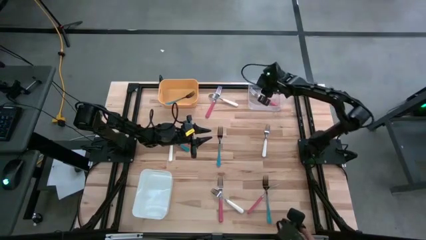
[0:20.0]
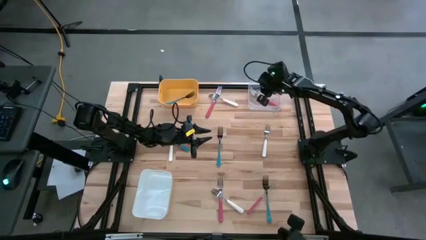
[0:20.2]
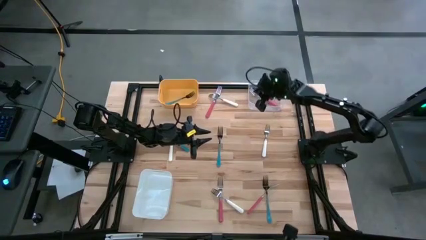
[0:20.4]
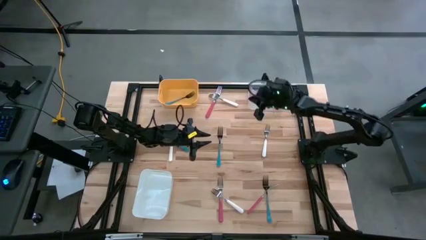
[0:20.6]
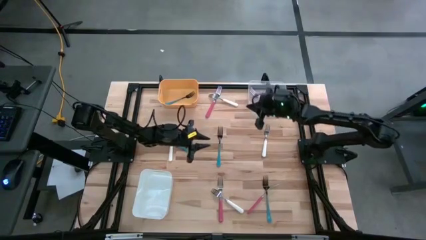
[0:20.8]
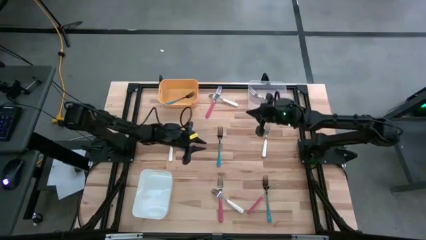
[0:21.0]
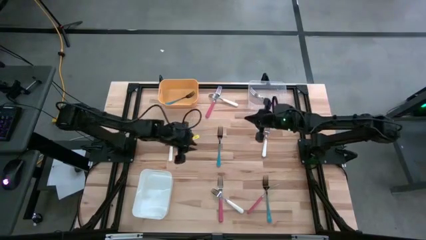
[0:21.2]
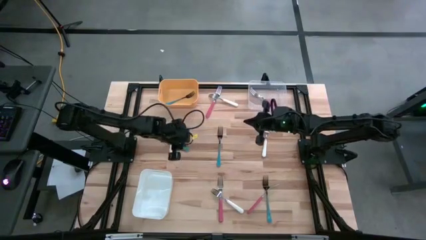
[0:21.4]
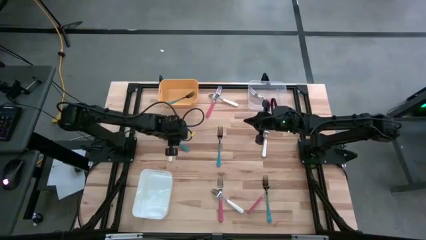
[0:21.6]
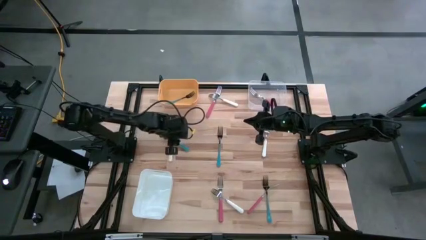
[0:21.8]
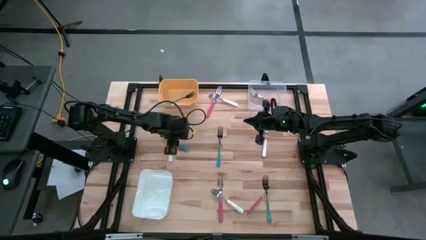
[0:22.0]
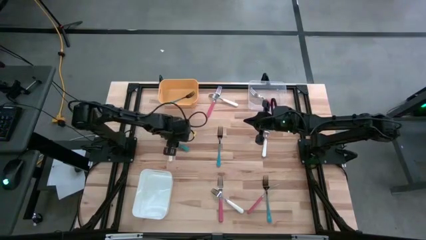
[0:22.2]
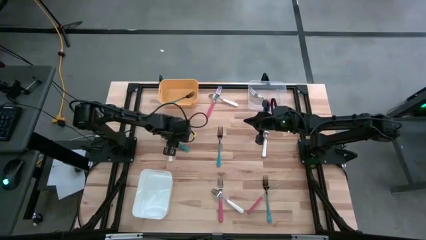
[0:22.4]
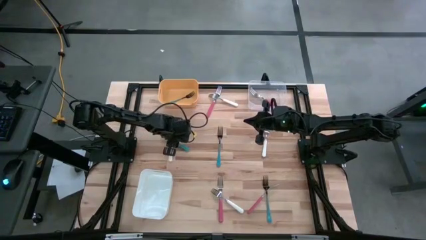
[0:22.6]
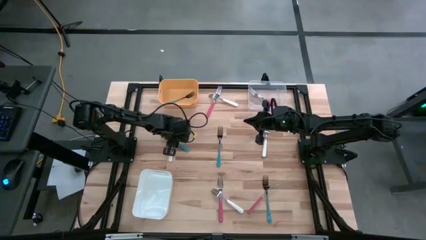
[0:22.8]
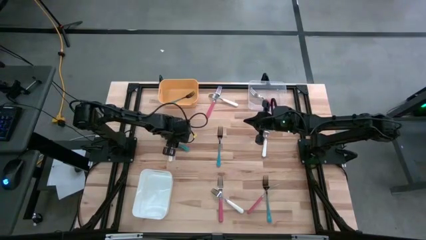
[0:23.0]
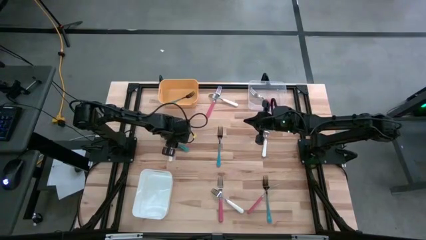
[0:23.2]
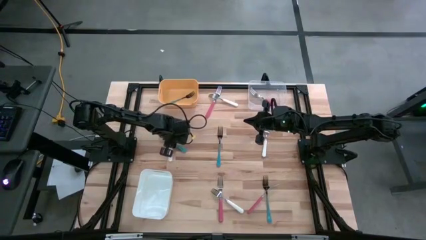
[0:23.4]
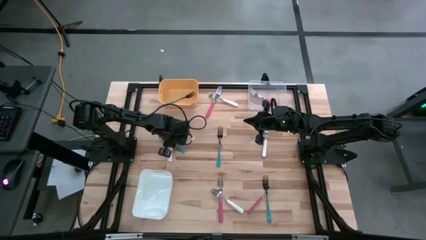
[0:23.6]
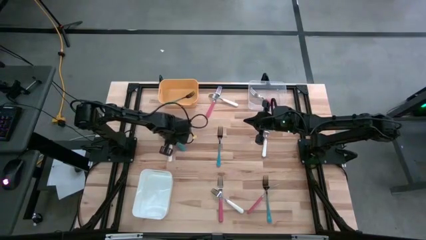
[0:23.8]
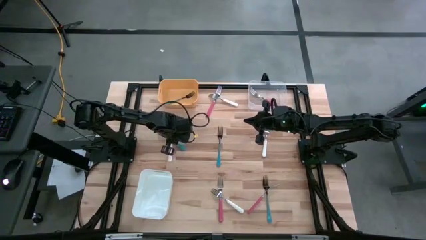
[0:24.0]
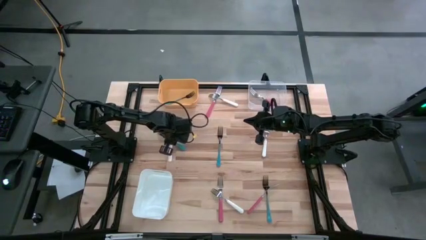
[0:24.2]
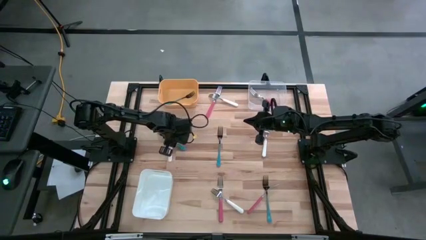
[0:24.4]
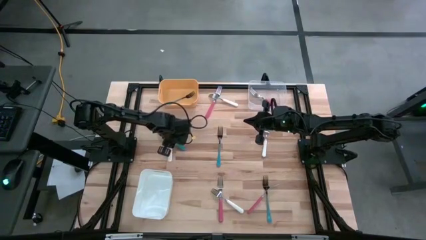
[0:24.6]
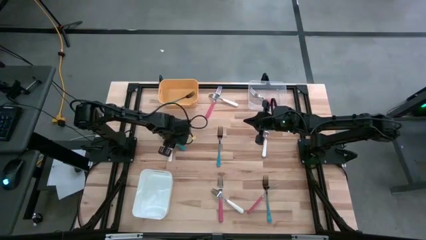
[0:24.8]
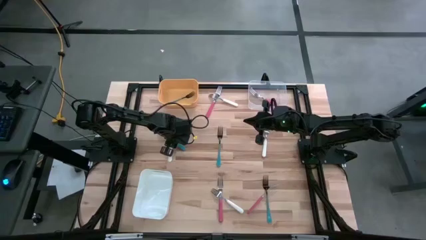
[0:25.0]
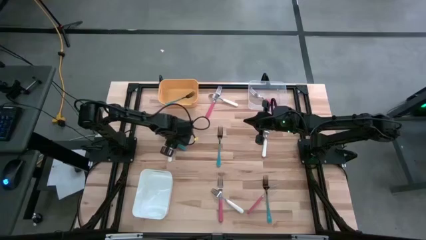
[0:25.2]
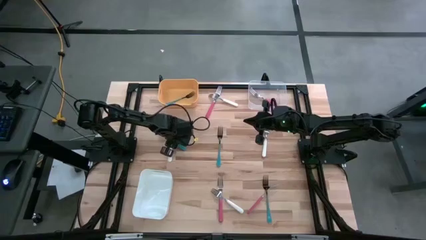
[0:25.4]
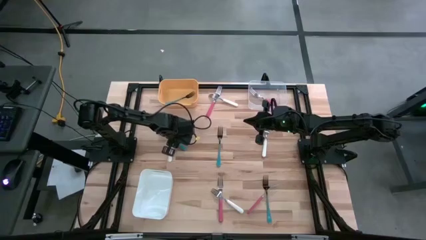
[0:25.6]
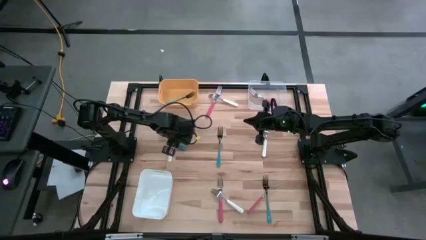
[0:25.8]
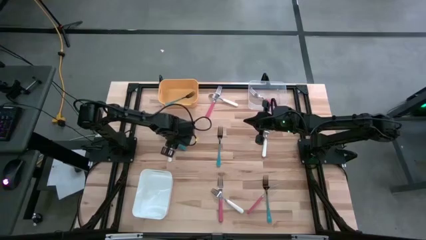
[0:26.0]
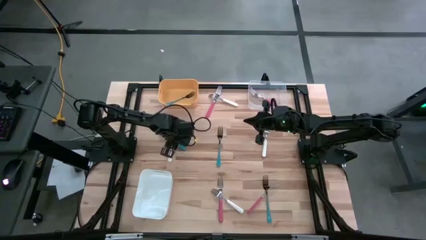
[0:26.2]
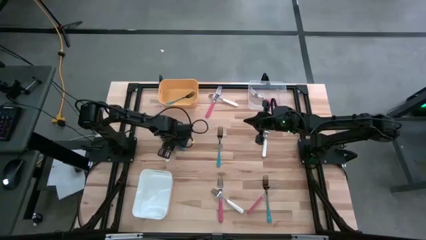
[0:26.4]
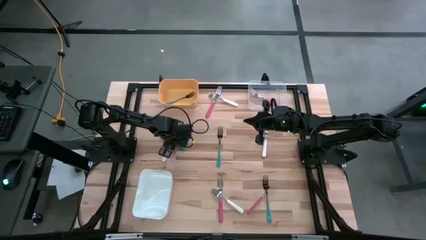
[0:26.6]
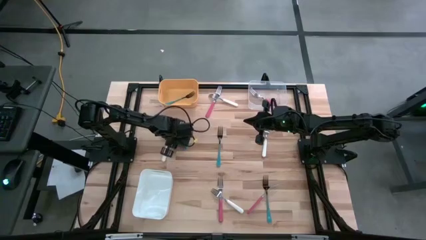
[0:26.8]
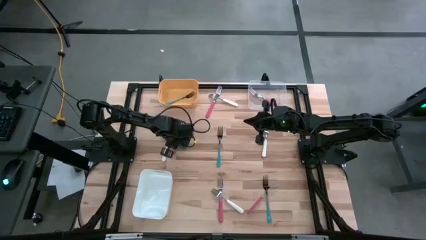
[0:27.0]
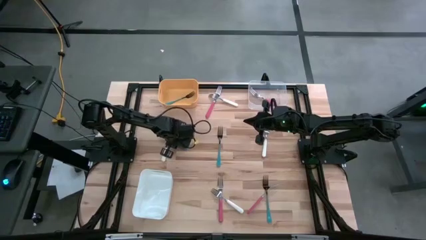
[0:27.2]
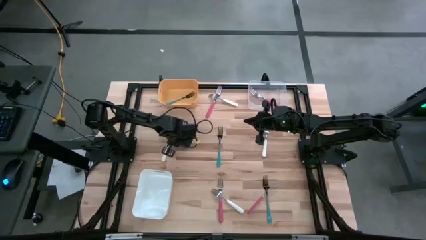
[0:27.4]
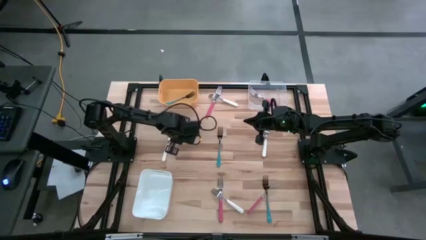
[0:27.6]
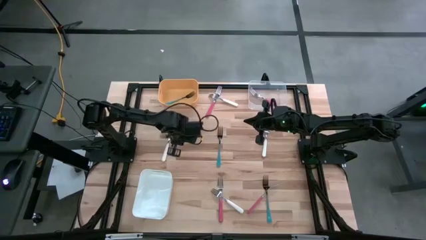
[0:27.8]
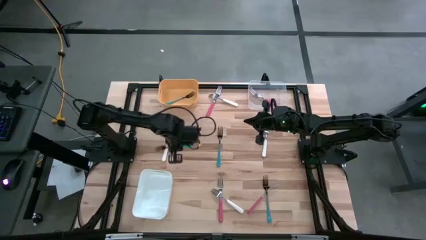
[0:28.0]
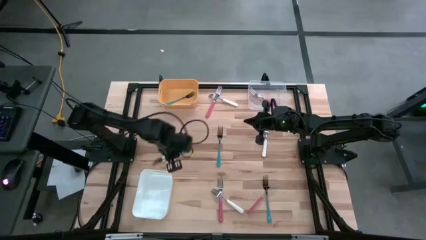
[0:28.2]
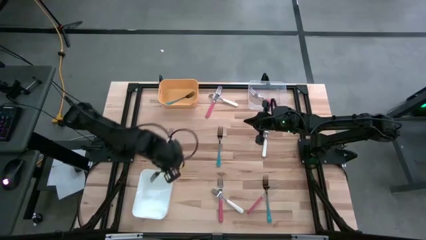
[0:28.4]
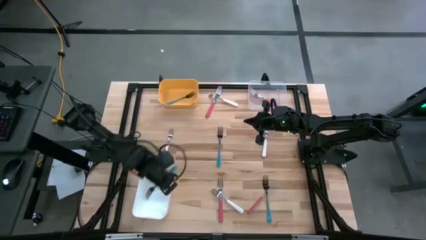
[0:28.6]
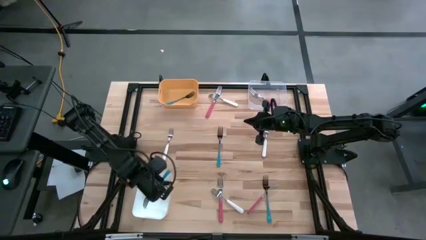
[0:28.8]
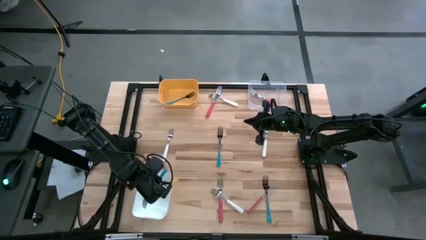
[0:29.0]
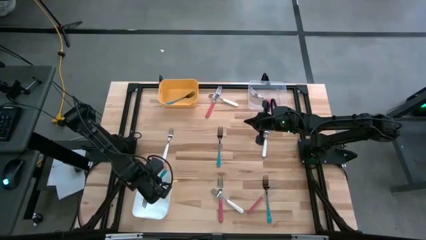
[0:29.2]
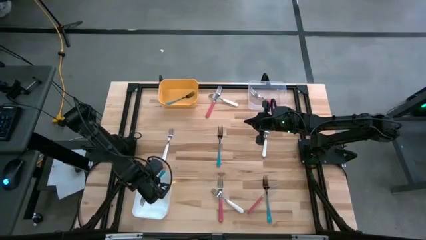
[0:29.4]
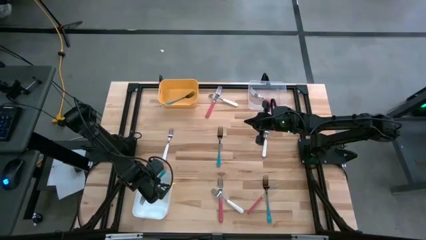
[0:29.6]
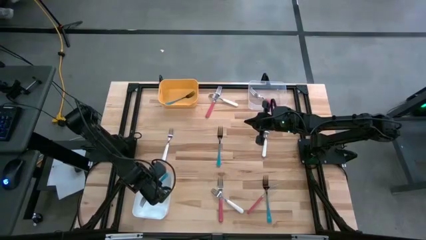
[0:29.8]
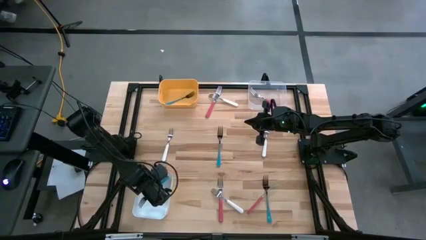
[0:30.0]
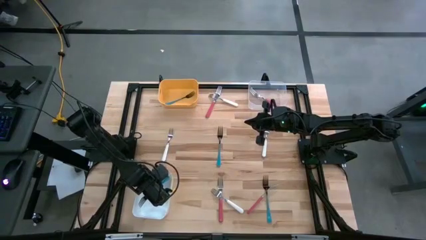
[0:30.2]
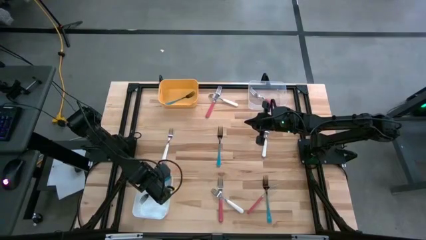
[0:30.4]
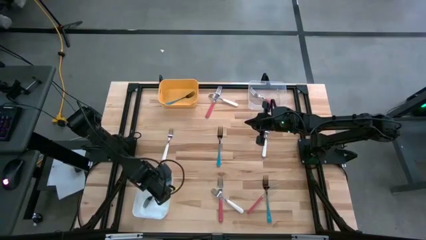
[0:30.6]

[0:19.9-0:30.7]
Task: Sort silverware by color (type)
Put the blue fork into the yellow bin

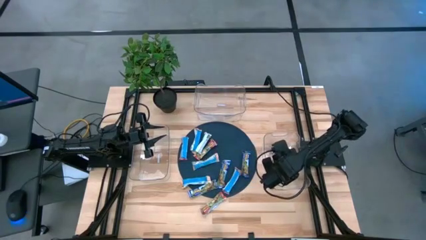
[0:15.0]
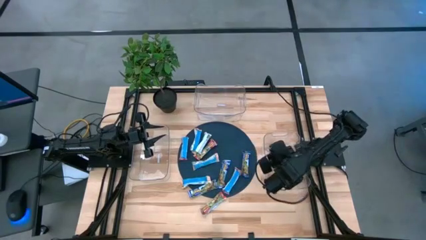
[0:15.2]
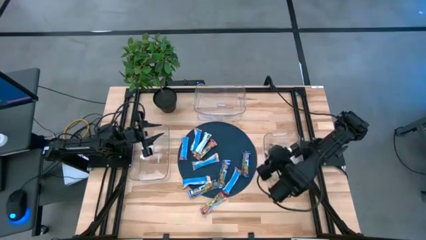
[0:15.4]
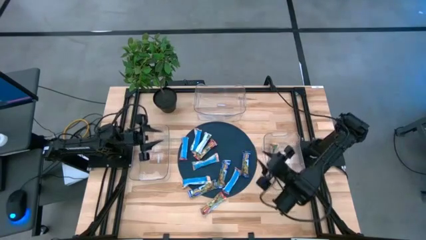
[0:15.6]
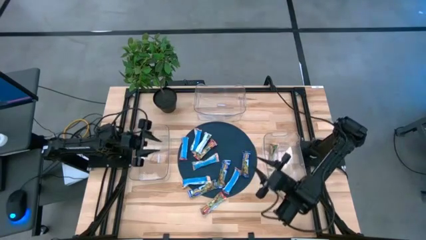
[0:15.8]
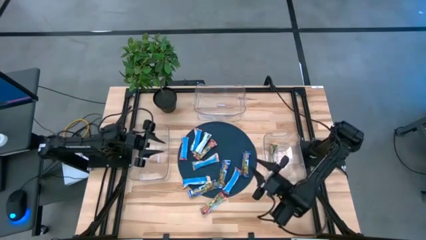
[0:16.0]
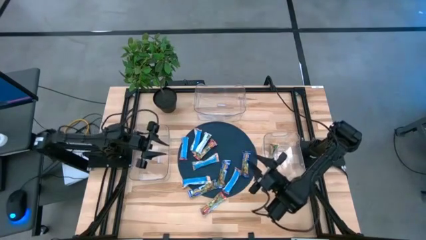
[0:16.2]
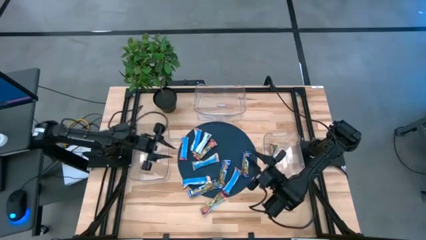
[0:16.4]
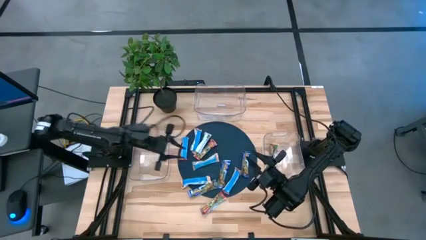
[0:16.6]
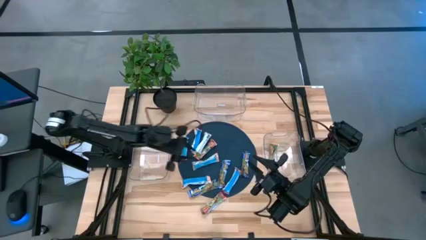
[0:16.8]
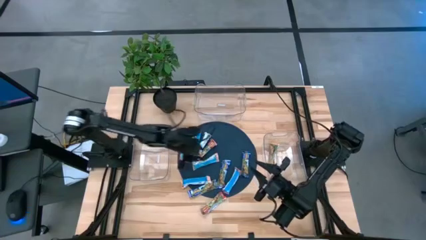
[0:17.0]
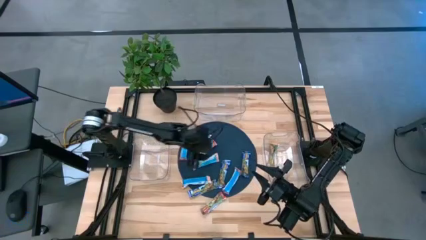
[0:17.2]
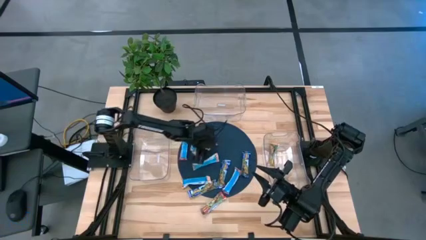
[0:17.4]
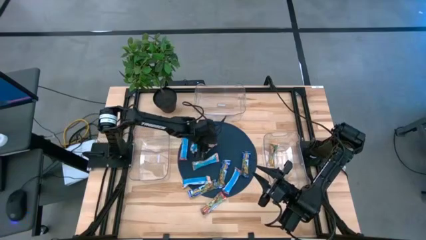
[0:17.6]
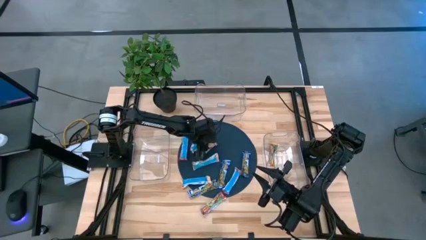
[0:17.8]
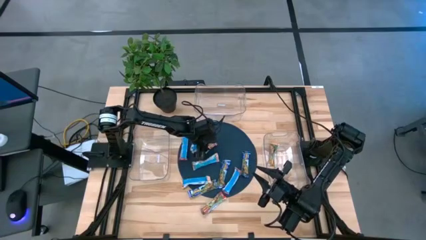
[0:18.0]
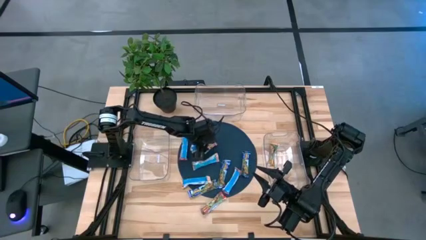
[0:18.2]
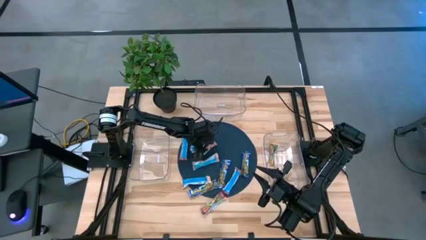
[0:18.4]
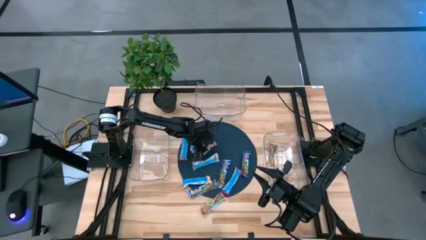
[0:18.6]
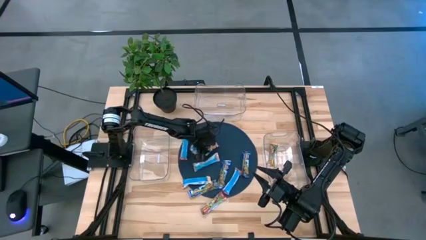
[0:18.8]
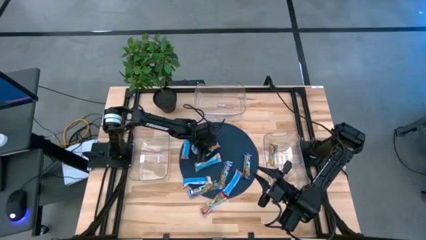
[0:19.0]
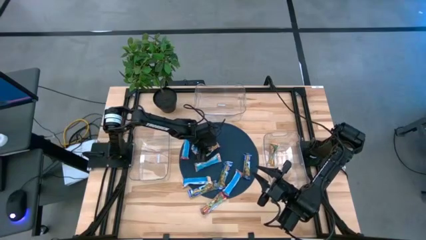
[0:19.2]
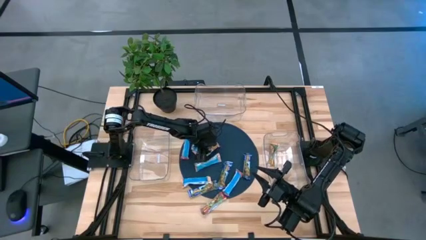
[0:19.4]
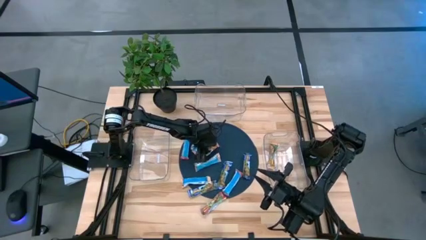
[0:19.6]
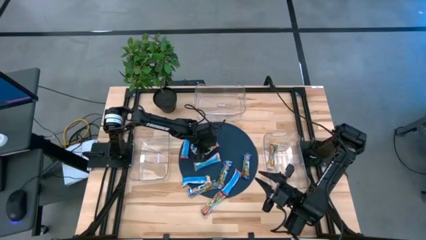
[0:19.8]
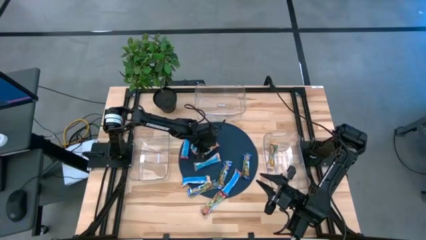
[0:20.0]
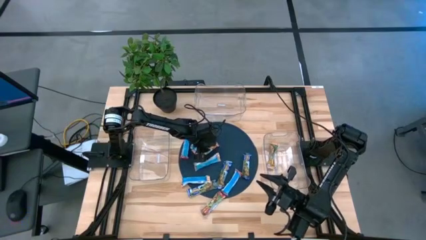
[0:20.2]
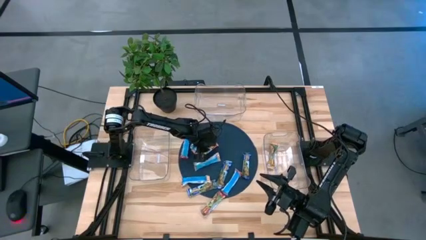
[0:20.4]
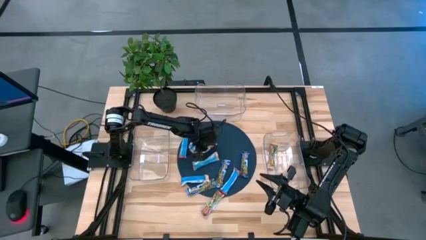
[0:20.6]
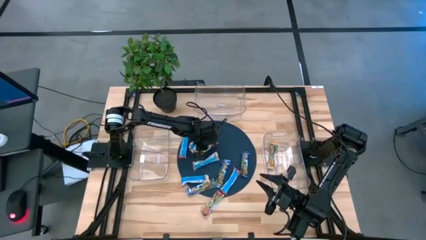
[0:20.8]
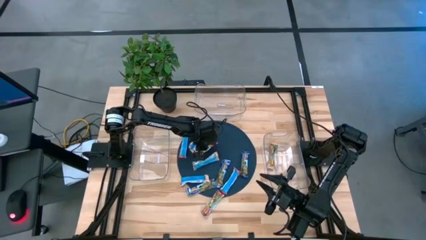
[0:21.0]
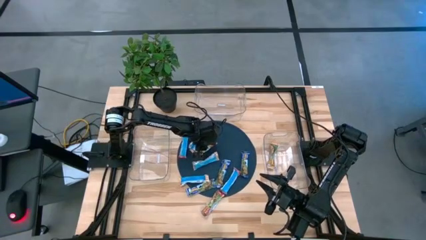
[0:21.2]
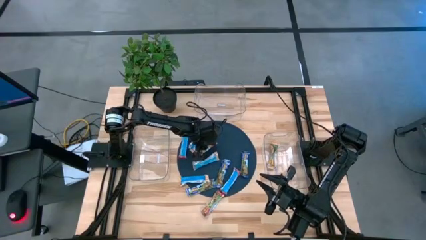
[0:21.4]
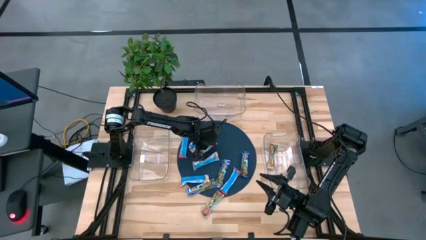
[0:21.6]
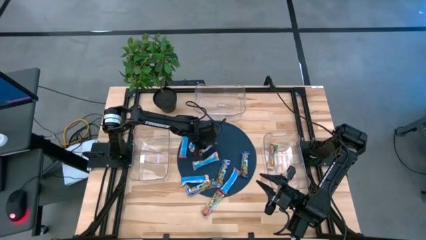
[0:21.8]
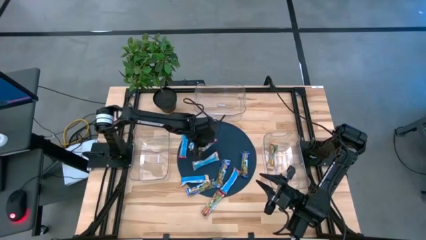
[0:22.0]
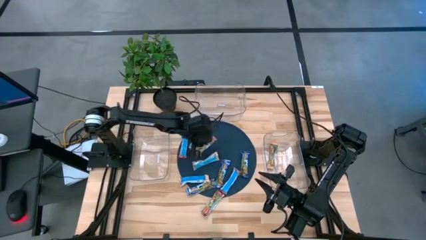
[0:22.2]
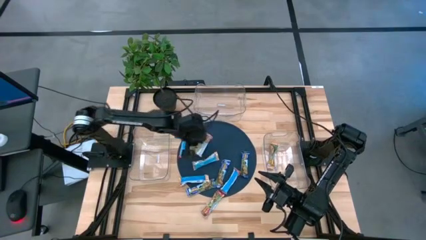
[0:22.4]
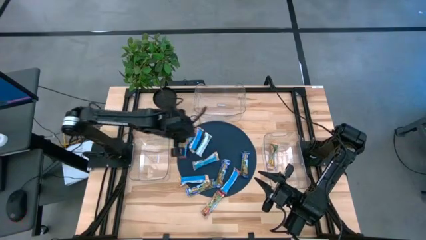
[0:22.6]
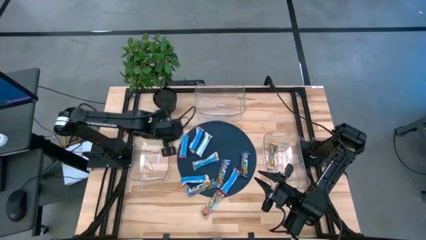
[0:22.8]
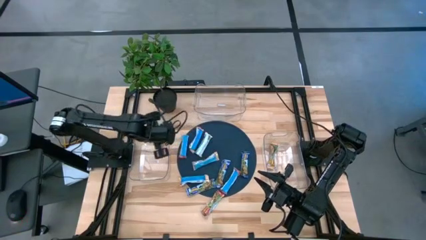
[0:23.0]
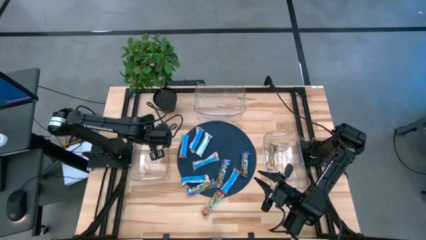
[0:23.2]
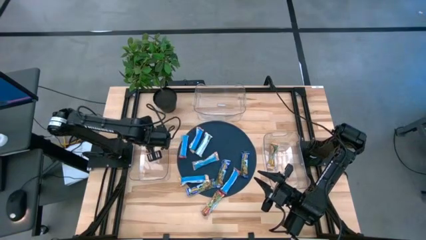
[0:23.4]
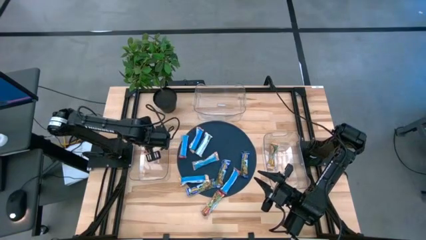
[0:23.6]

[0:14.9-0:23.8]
Task: Pick and place Granola Bars by type
Put the red granola bar into the left transparent bin
